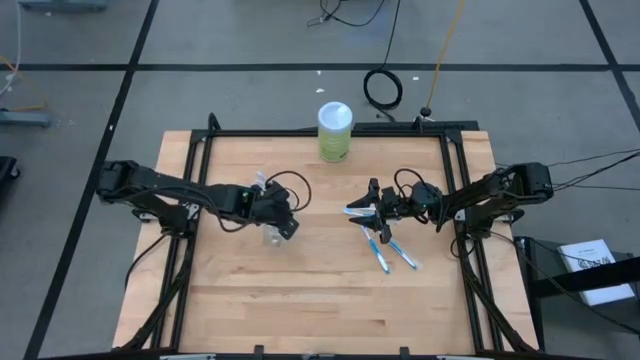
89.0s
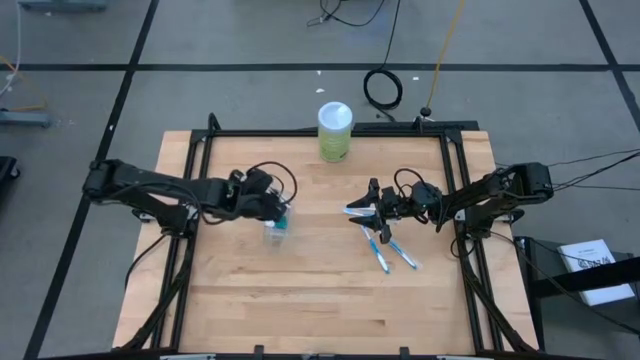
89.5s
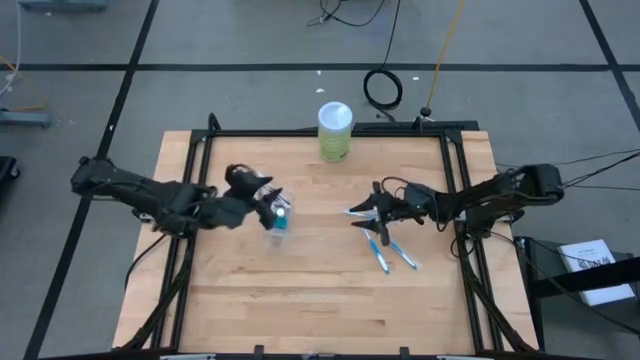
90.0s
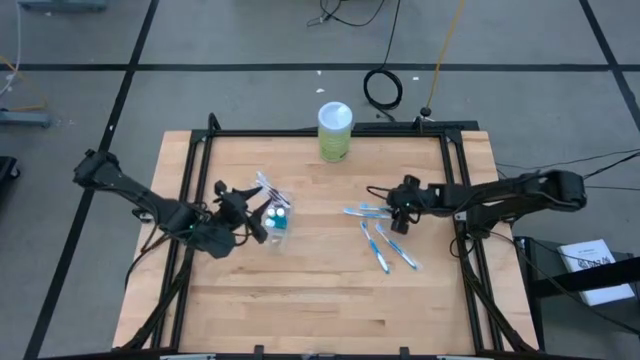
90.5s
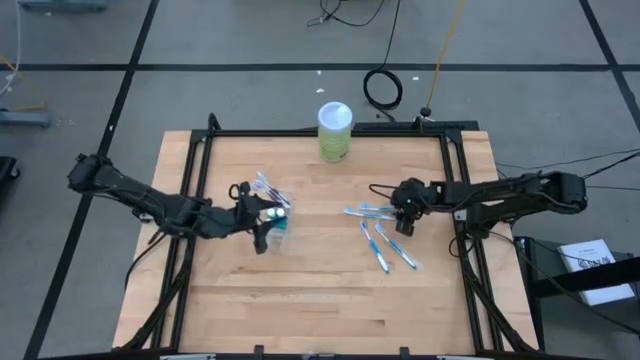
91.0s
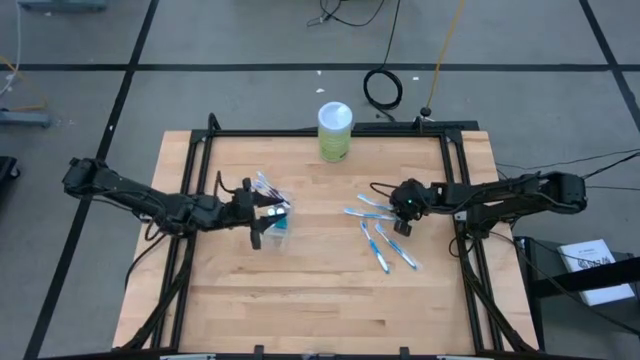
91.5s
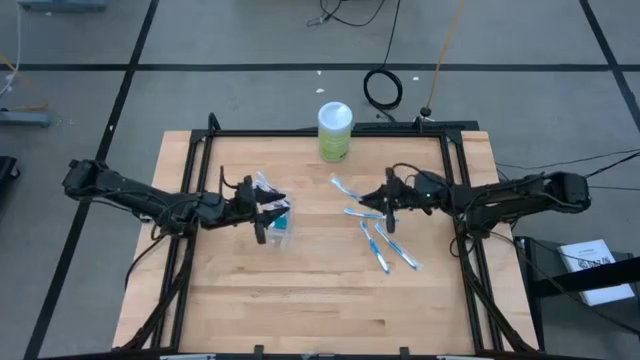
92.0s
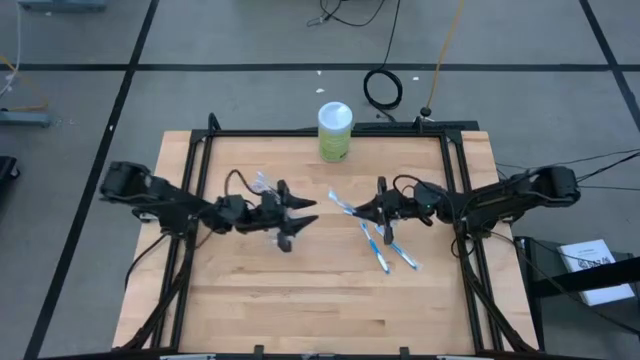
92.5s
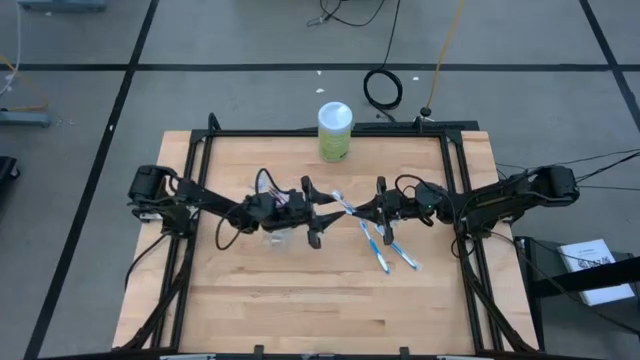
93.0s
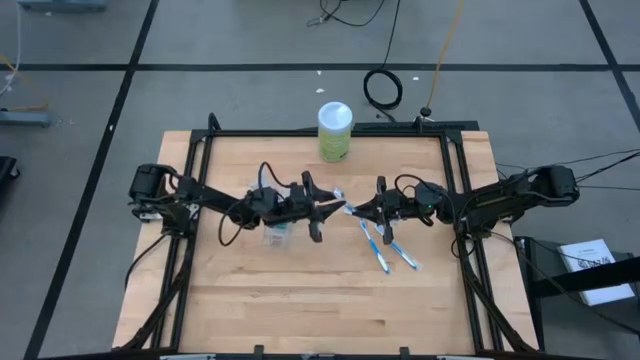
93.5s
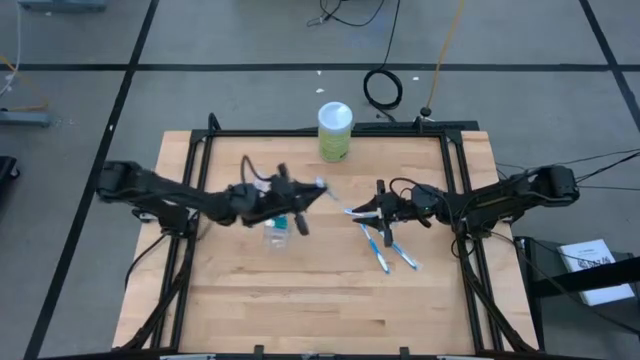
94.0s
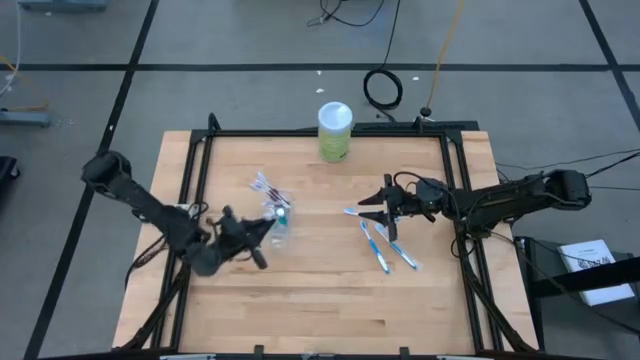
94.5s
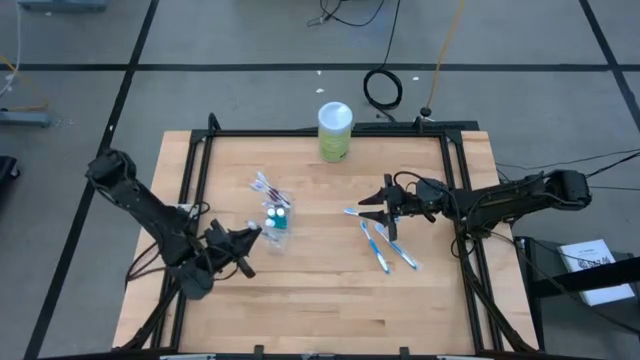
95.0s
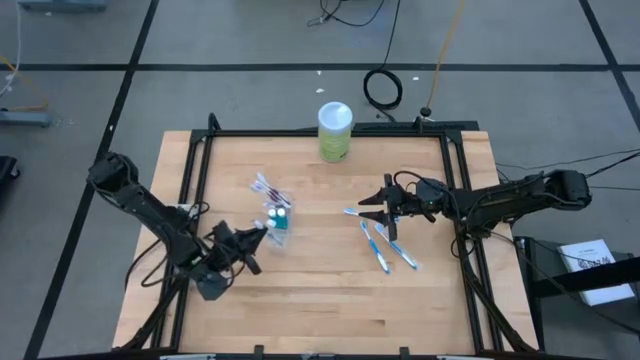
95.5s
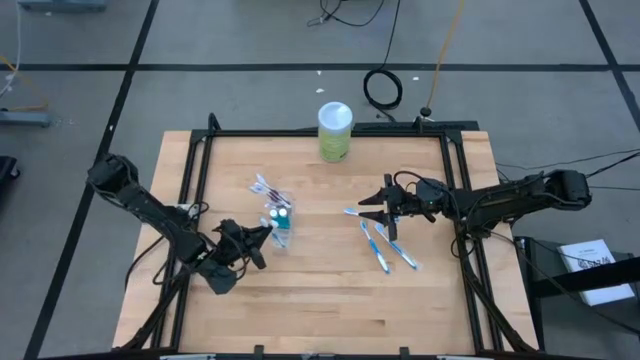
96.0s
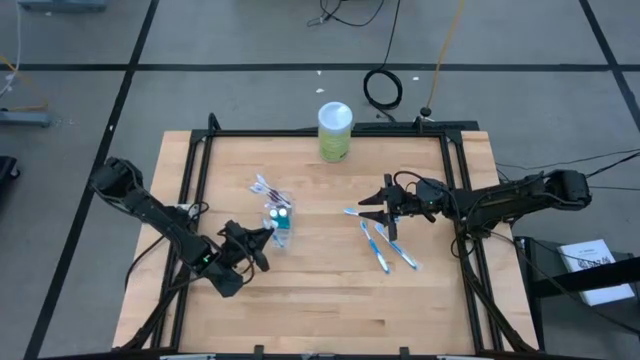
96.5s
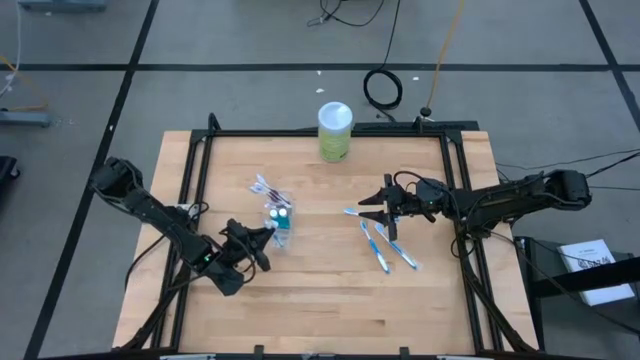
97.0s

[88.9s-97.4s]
Task: Pick & Place toothbrushing station
Put the blue toothbrush into the transparent organizer

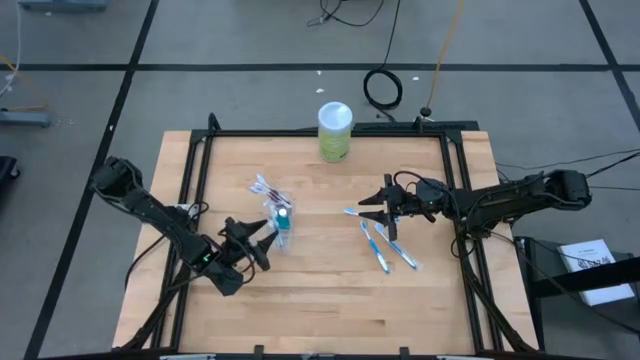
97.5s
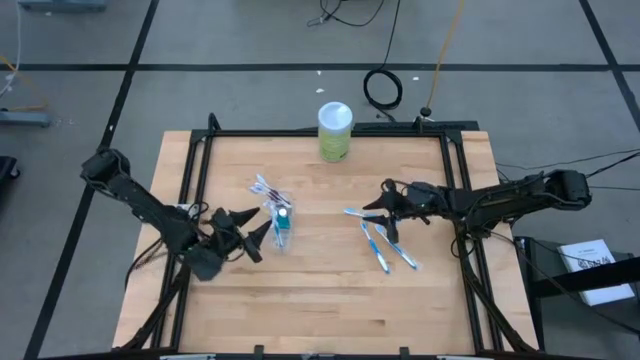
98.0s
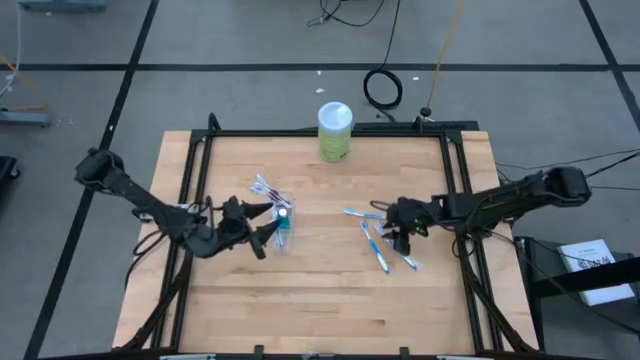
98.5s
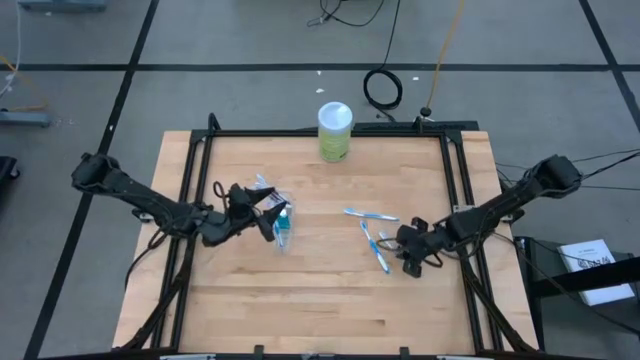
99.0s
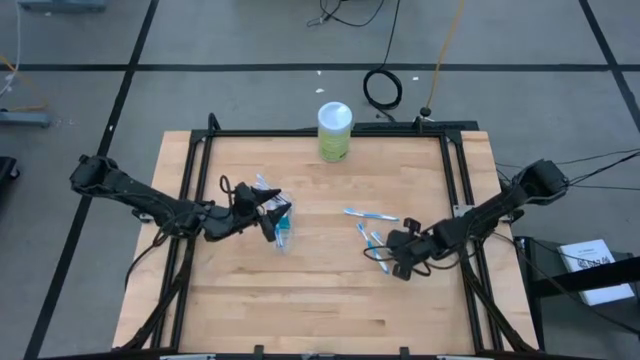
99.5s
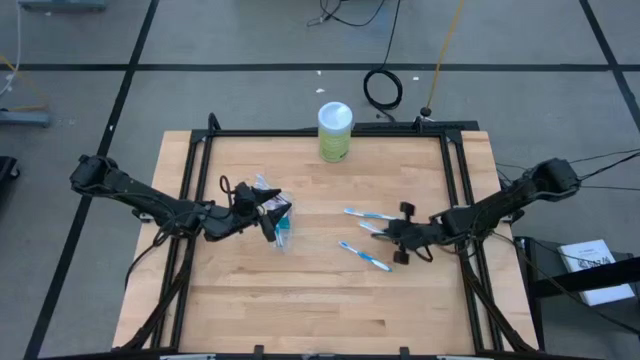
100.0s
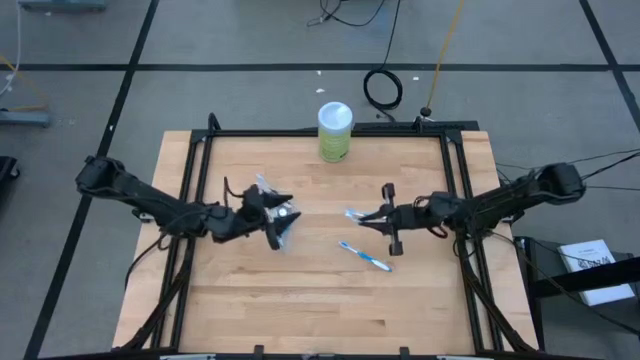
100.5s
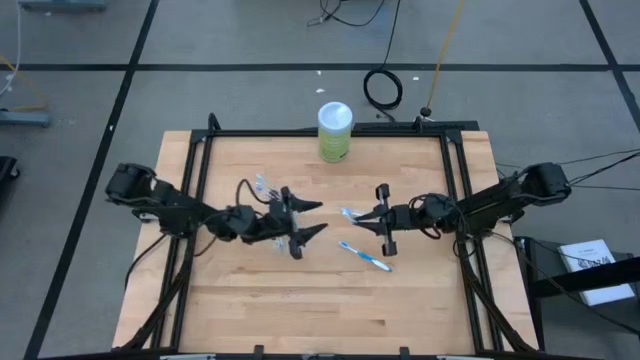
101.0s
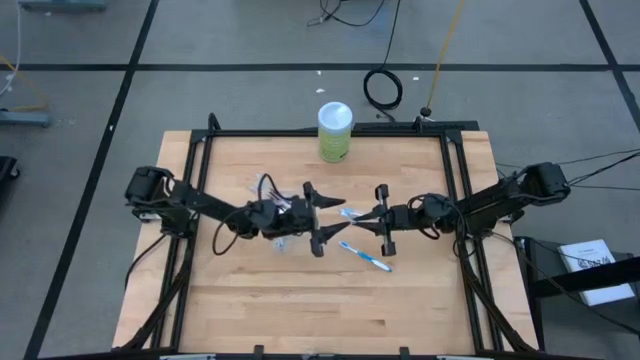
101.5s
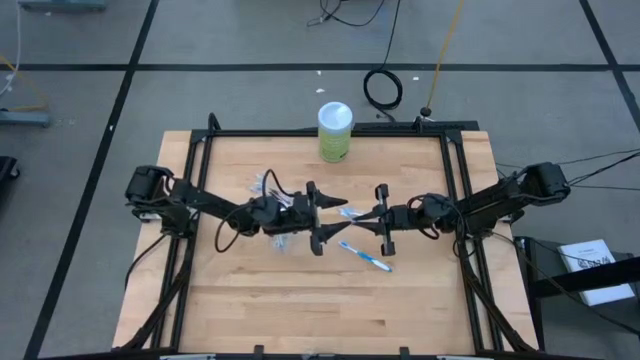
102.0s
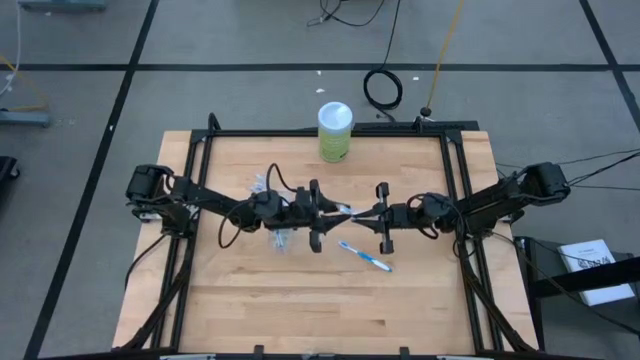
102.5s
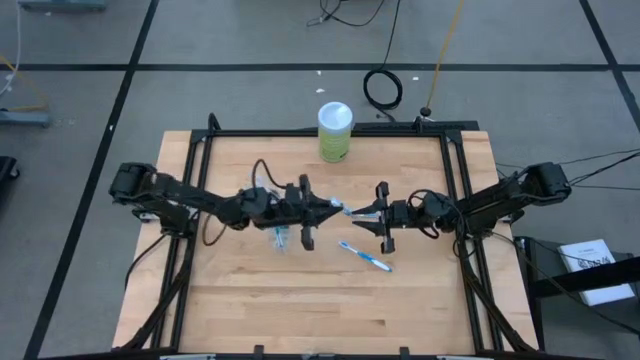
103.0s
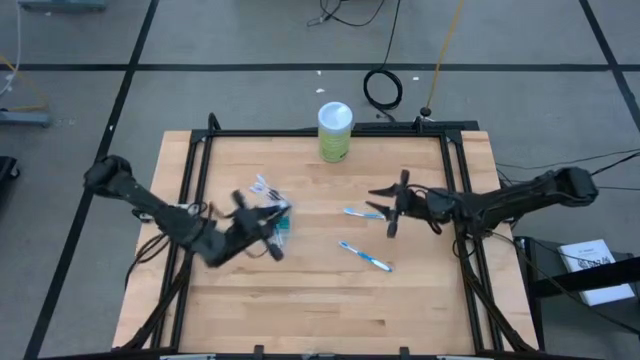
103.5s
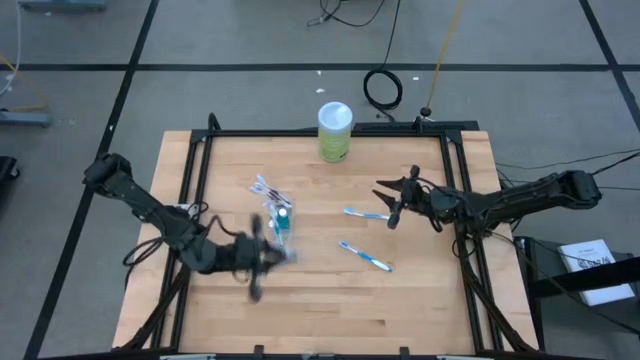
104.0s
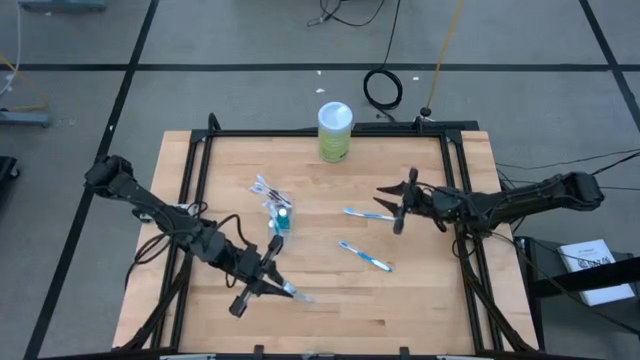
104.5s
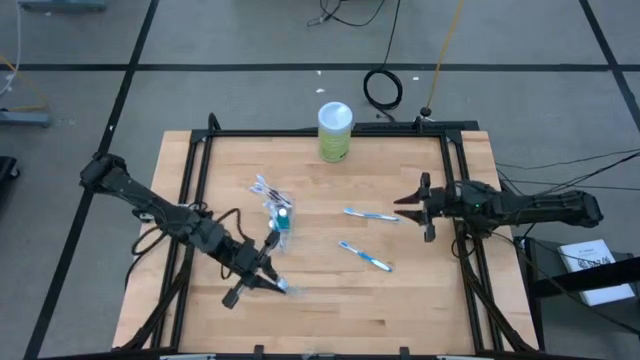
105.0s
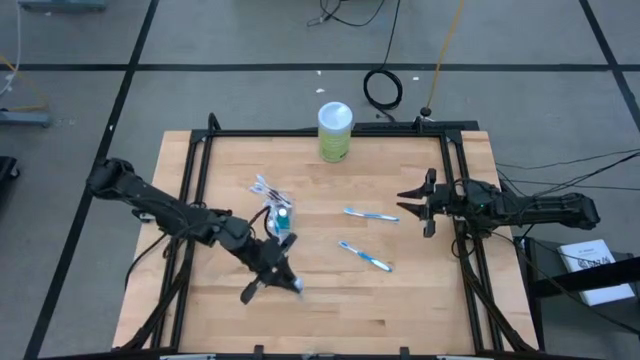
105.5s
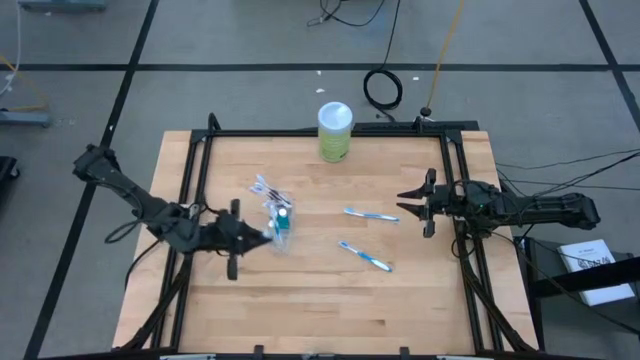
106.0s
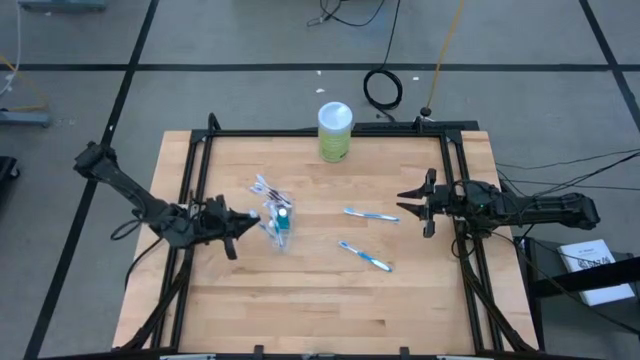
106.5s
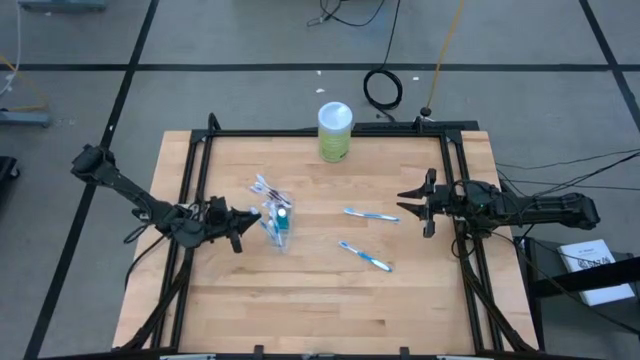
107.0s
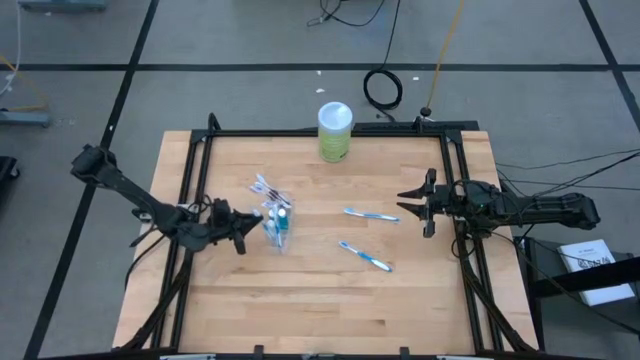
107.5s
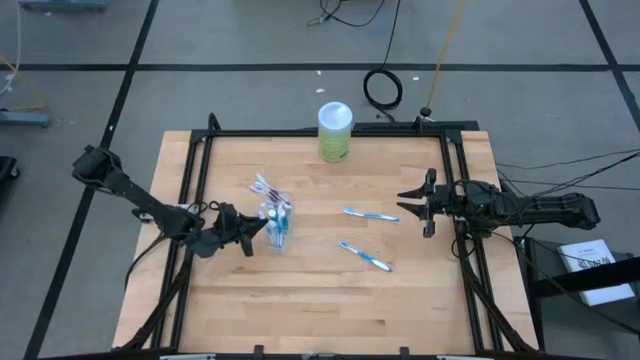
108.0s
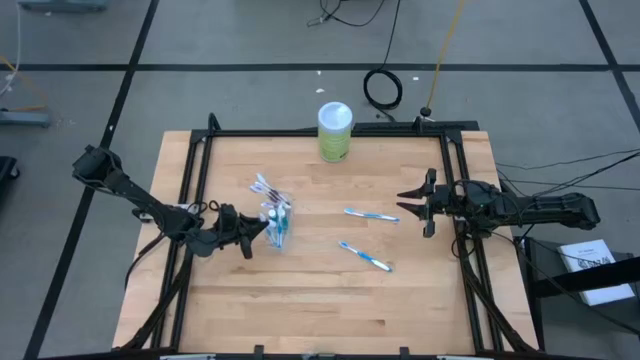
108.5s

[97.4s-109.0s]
Put the blue toothbrush into the transparent organizer
